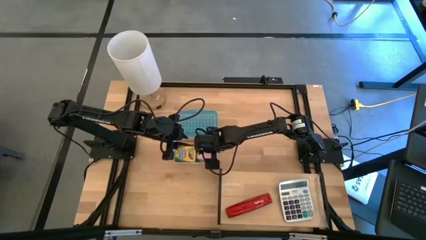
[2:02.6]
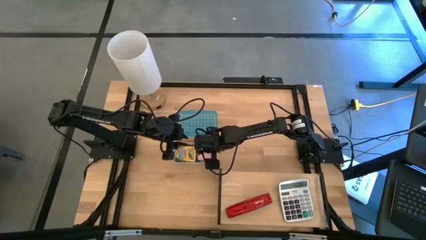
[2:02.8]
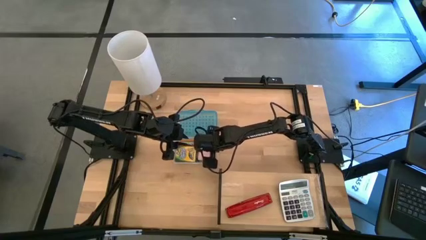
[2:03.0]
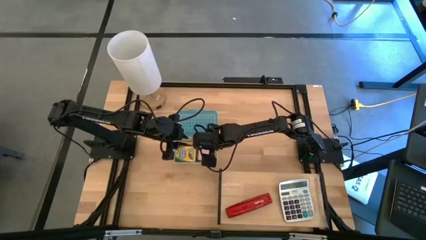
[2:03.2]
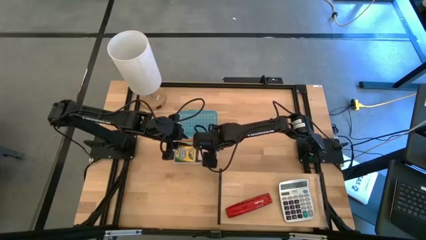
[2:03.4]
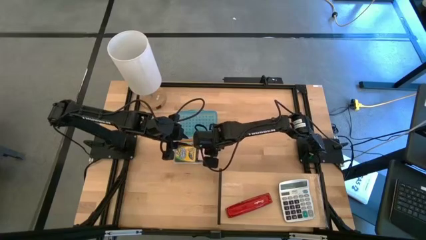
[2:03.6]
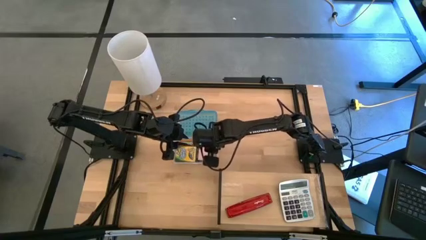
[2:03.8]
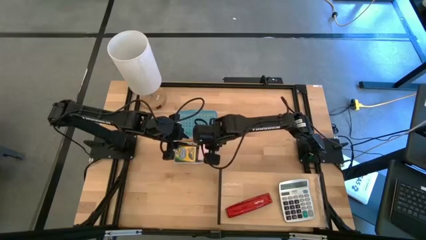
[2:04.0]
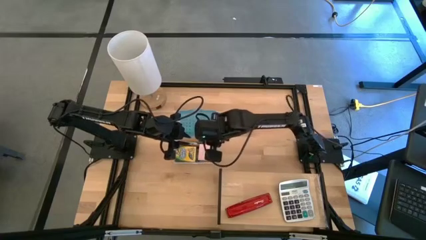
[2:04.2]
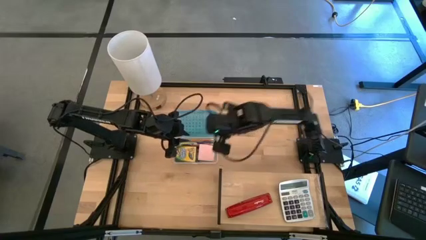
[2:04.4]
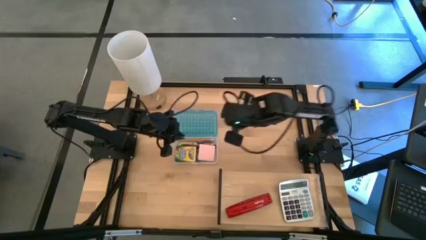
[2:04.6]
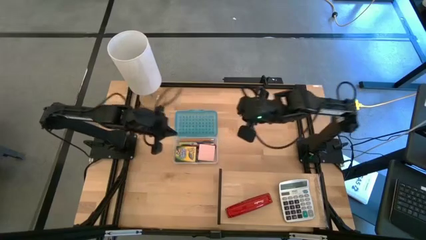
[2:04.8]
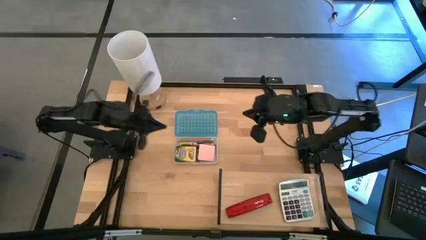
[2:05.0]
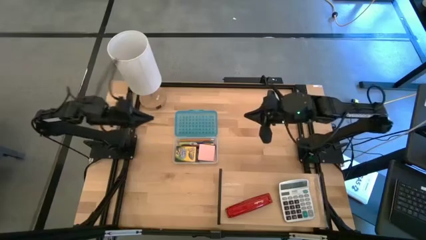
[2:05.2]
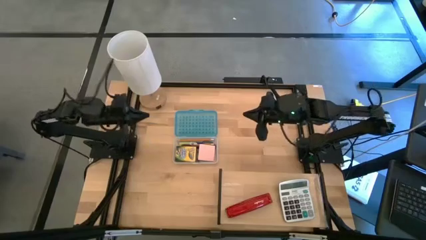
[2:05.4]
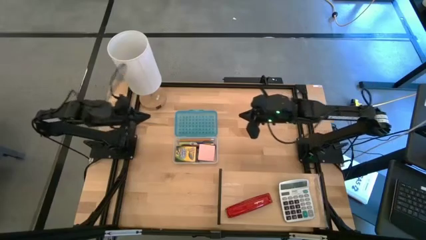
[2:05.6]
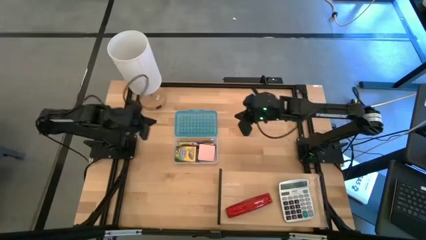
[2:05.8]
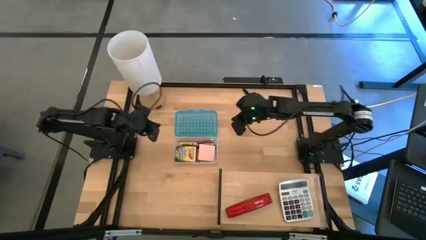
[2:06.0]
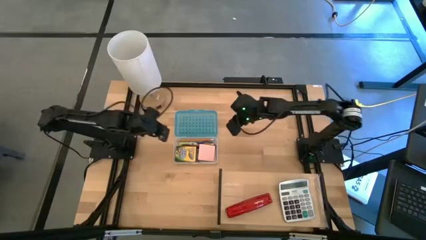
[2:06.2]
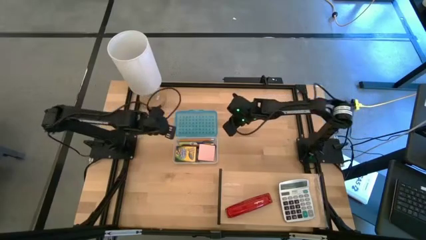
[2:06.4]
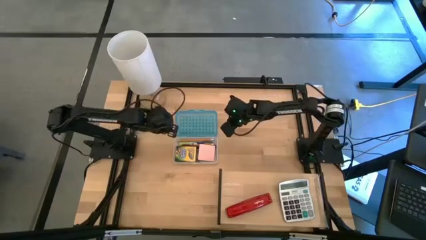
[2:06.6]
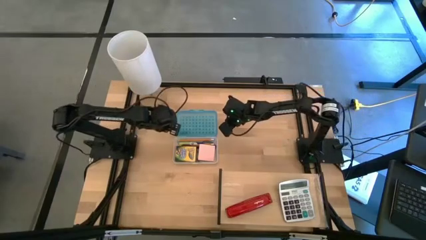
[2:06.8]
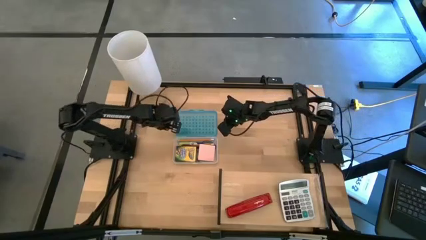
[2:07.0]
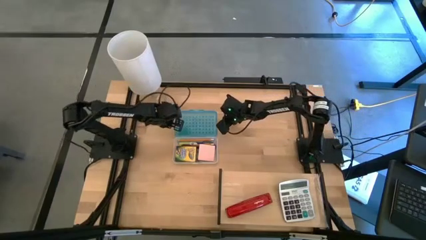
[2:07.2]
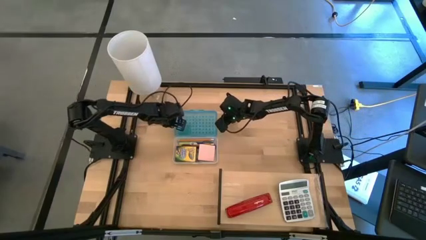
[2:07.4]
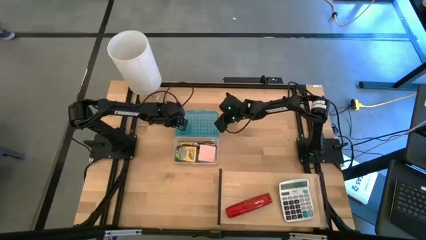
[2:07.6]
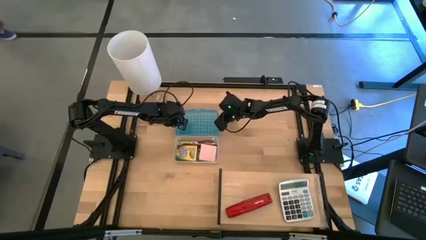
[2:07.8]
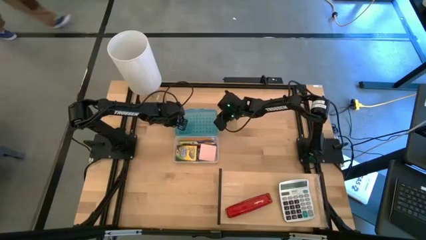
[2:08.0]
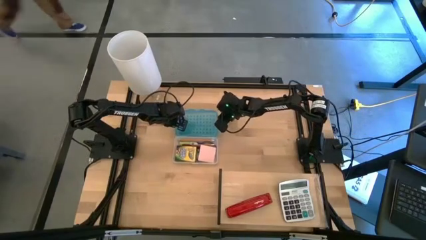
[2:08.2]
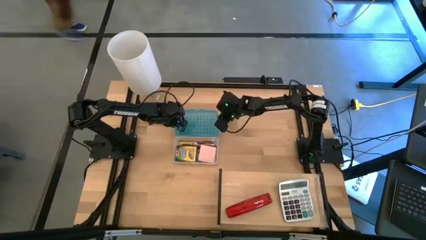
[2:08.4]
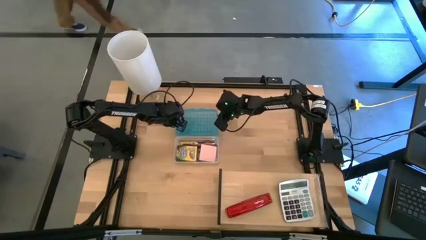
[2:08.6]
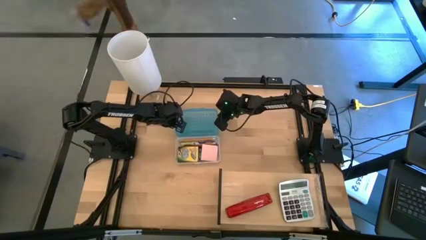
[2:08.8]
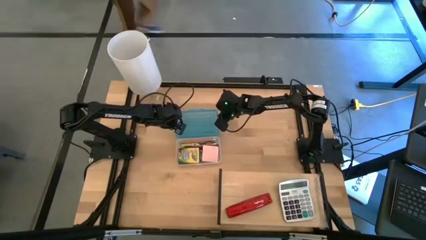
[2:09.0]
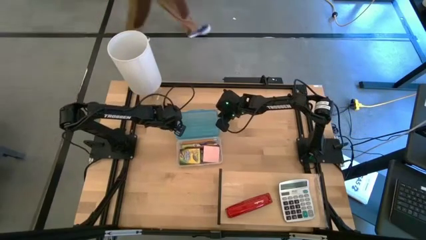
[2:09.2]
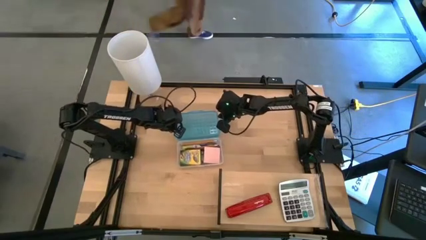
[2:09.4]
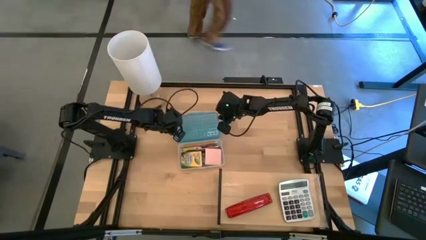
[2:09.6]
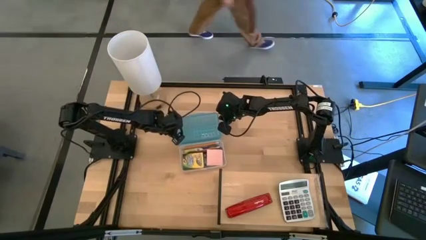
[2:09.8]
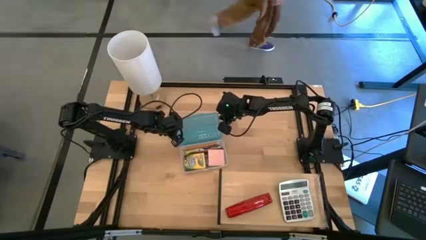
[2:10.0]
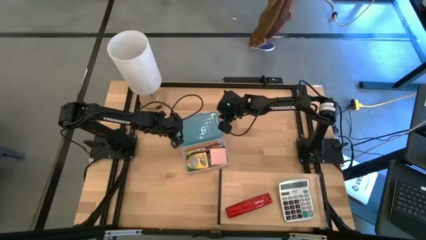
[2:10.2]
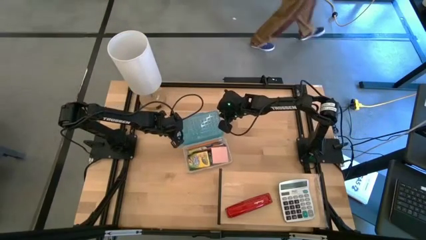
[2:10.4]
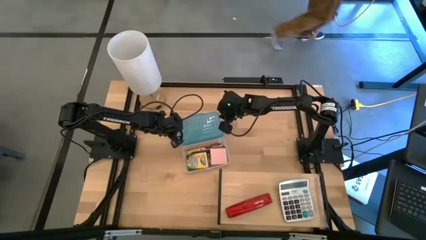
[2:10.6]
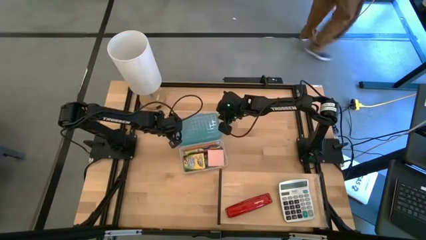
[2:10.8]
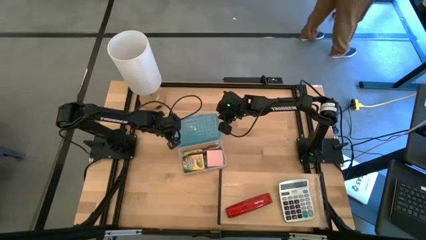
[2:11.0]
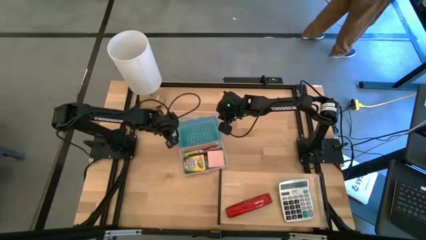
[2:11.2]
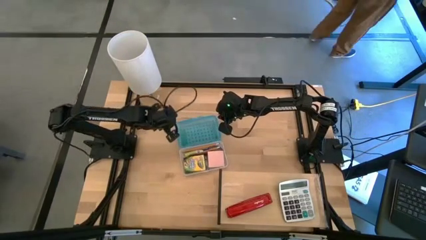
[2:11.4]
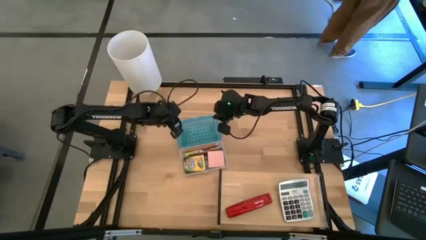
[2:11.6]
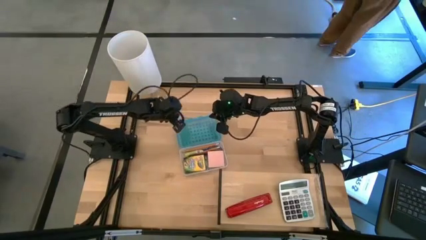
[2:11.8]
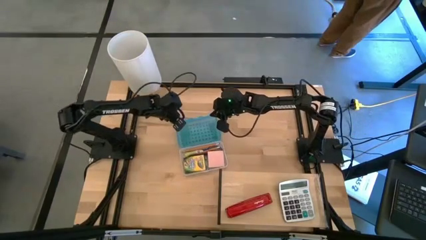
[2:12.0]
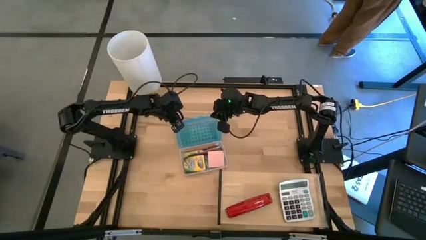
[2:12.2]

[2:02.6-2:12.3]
Task: Pack school essentials
Close the blue supply box

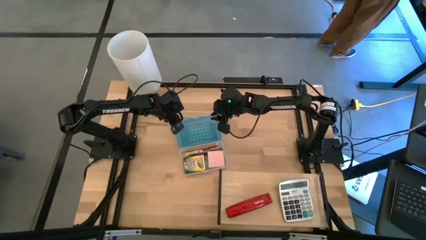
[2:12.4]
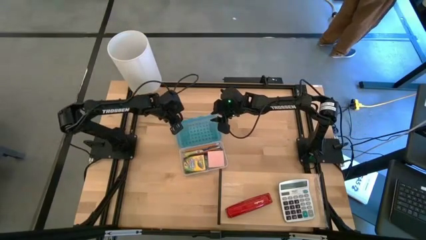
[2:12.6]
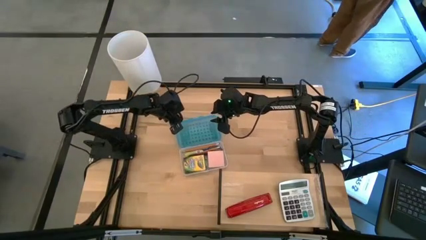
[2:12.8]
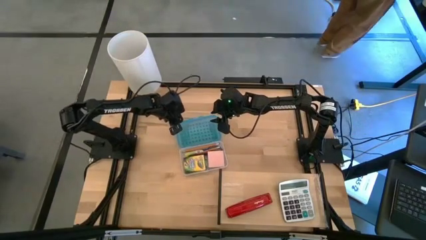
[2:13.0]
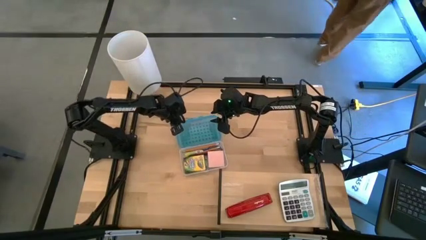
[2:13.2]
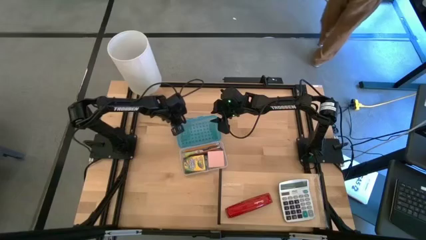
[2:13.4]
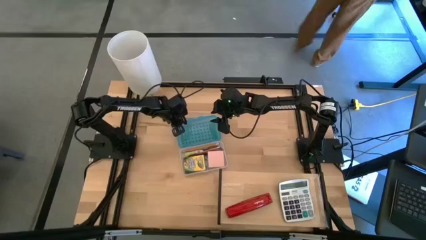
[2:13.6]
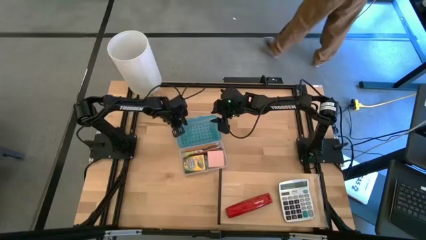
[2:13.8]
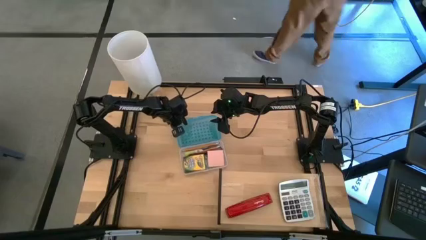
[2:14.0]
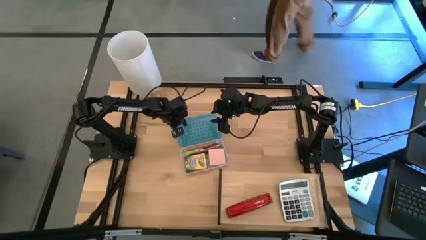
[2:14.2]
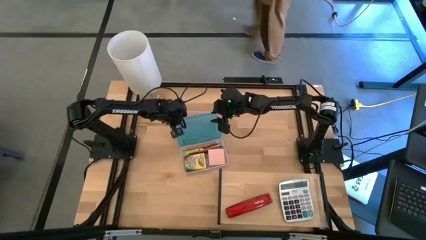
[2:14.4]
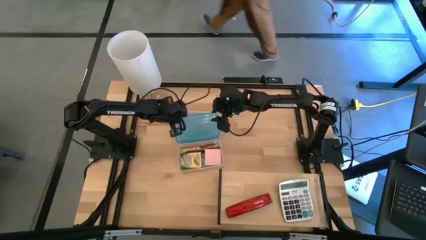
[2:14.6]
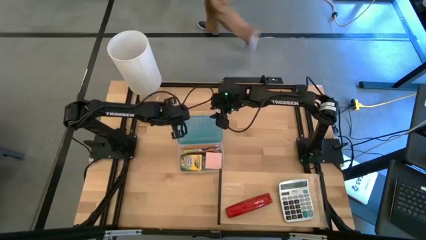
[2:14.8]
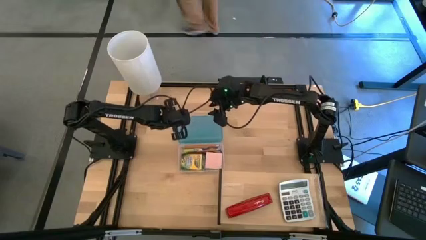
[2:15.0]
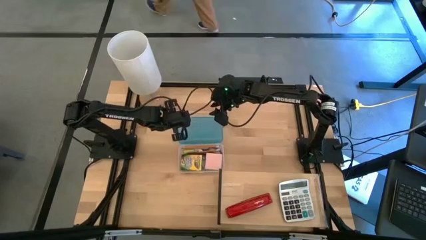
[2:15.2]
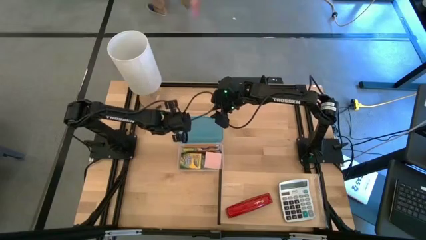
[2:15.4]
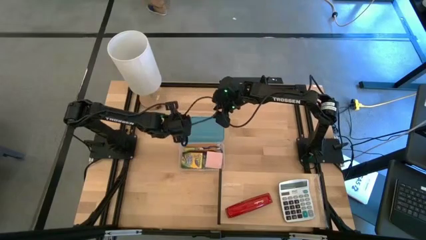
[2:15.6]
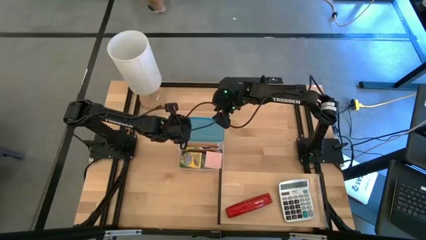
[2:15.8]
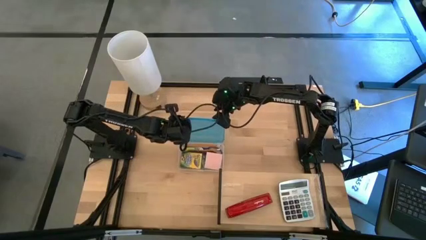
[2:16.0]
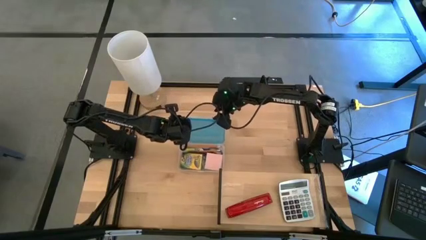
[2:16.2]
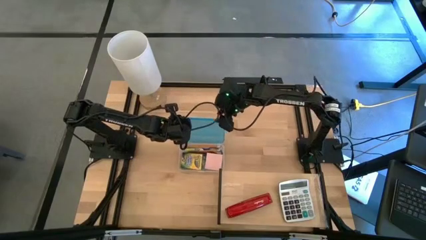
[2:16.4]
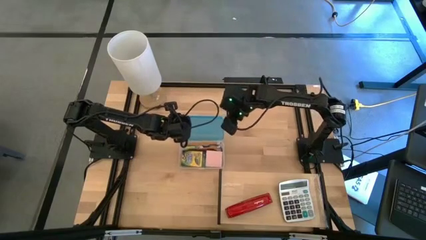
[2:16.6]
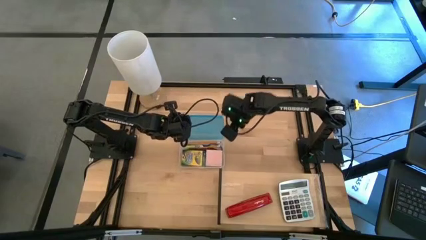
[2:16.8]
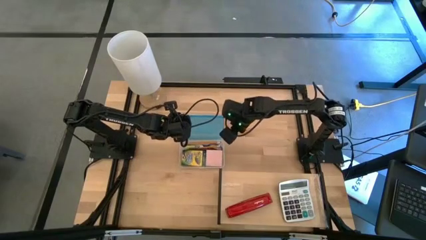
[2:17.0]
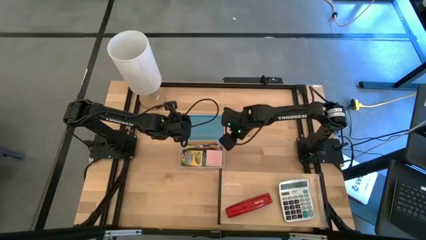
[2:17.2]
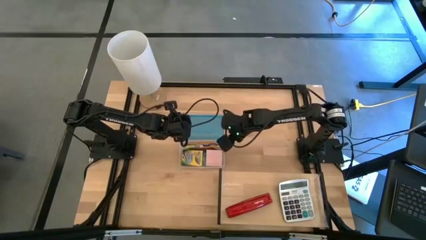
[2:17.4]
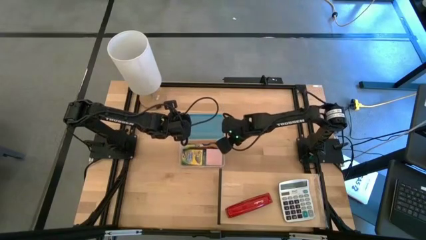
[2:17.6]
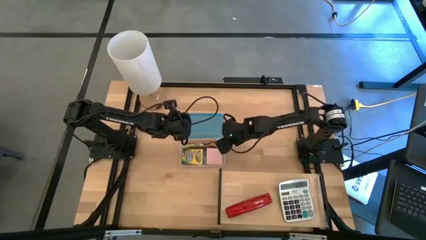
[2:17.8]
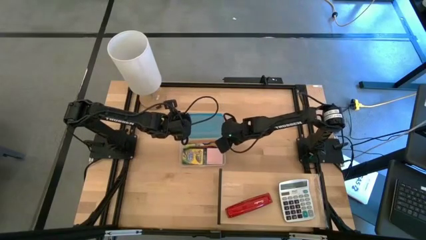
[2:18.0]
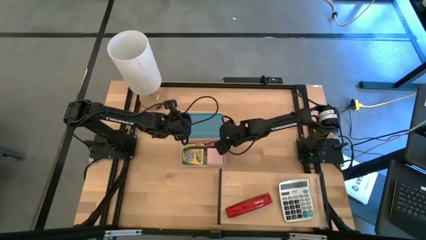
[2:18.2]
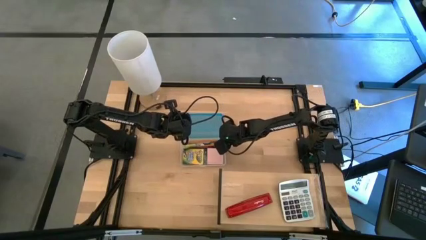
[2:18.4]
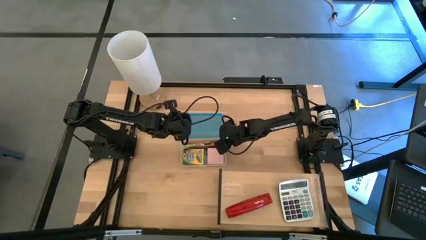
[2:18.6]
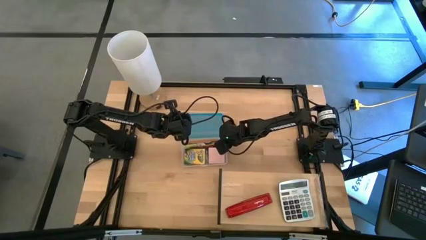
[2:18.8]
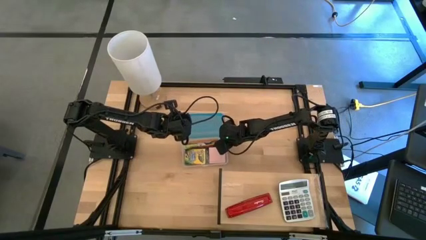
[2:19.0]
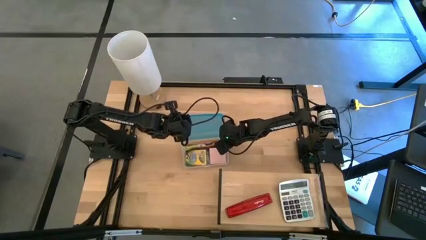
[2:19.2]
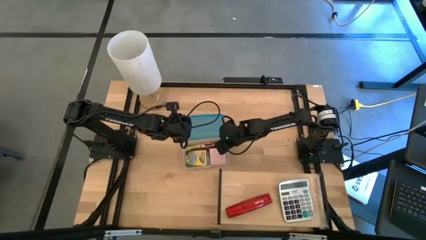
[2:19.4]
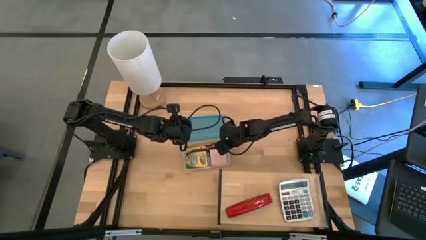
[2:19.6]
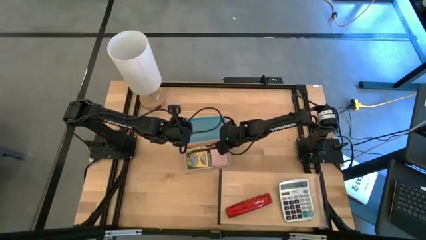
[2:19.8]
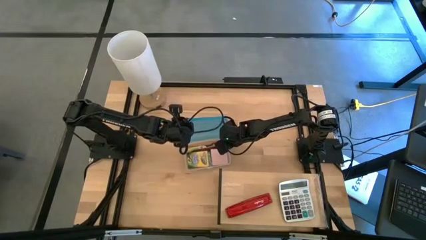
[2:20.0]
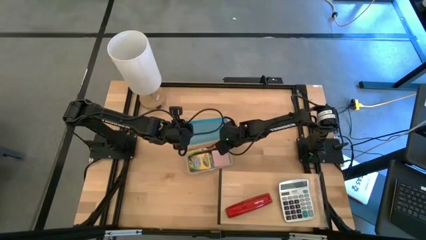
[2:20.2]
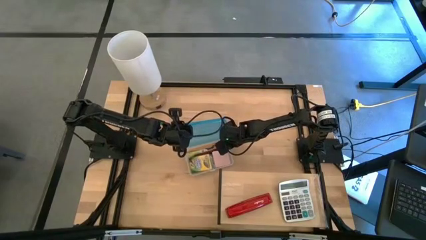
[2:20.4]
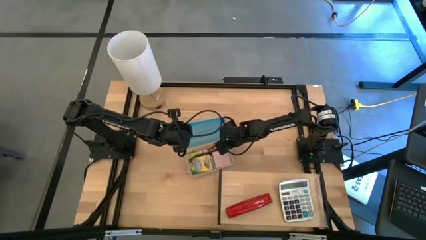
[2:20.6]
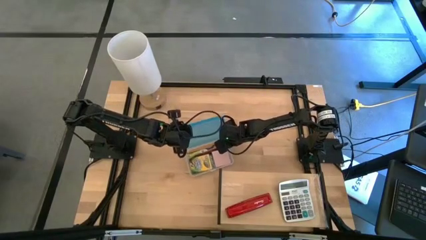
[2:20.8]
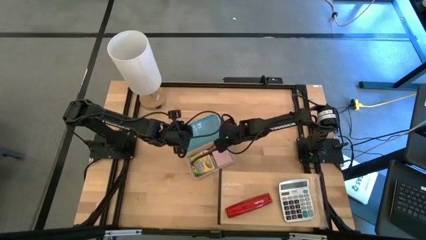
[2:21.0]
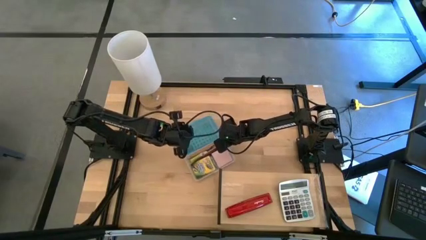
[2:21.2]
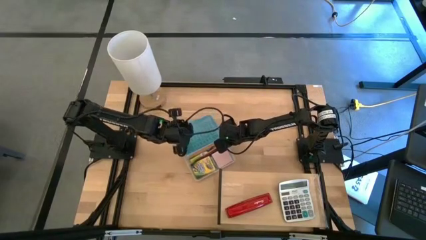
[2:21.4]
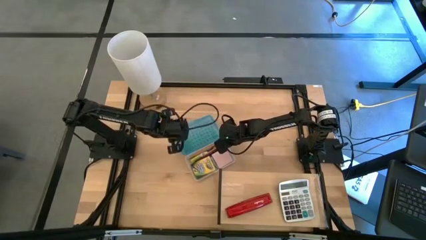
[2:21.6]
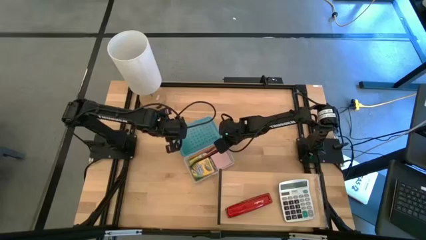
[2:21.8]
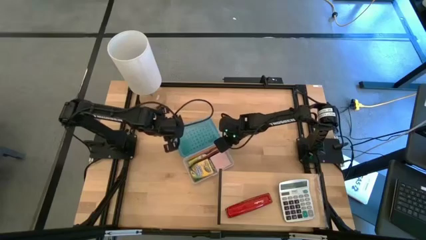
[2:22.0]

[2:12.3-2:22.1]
Close the blue supply box
